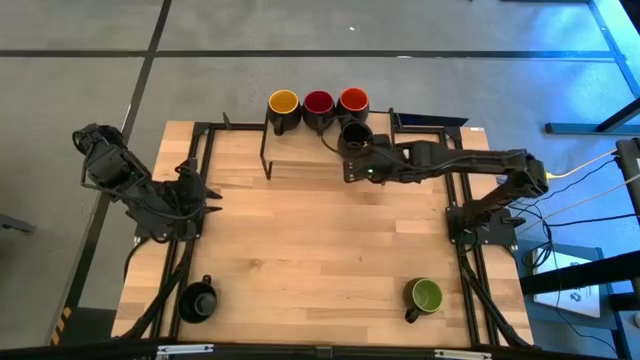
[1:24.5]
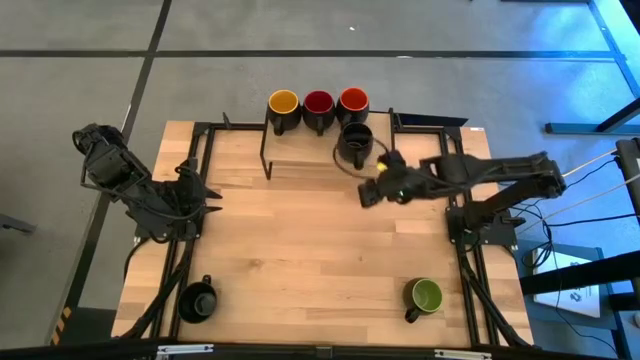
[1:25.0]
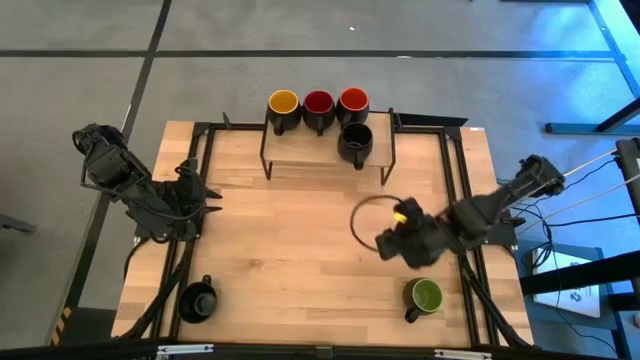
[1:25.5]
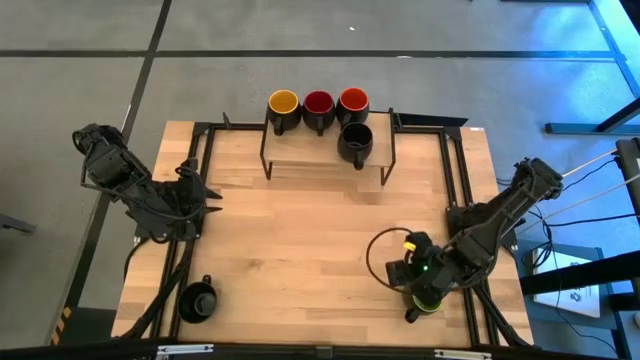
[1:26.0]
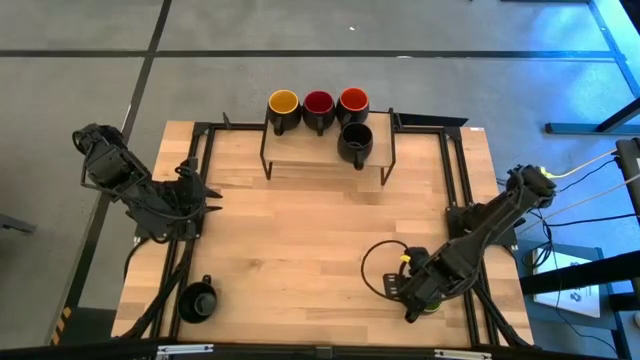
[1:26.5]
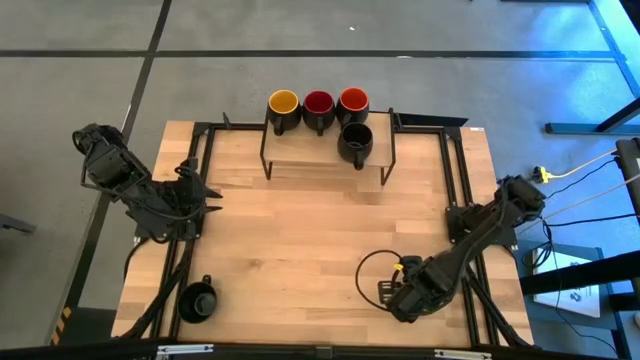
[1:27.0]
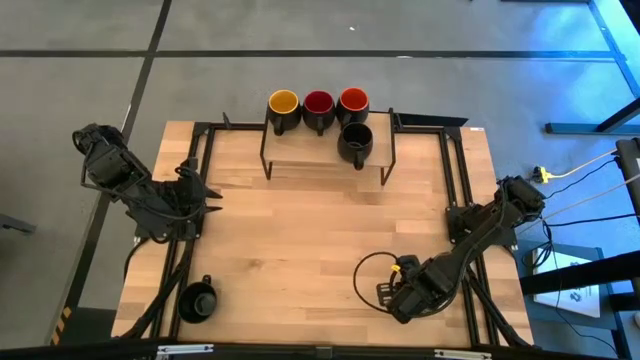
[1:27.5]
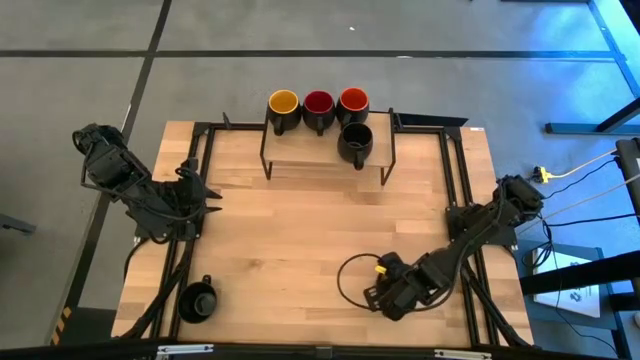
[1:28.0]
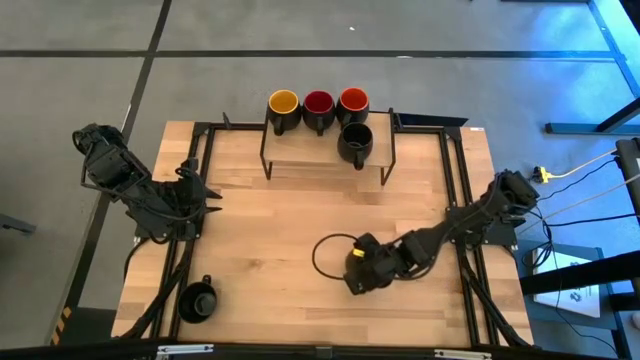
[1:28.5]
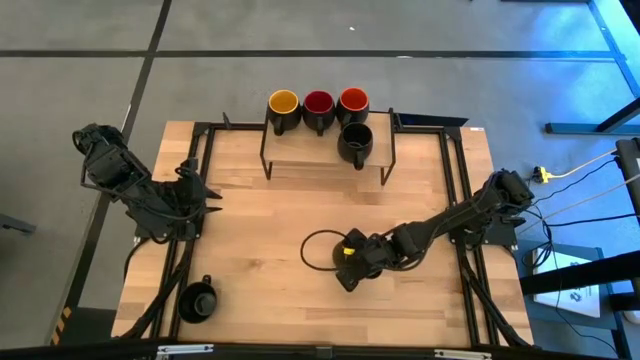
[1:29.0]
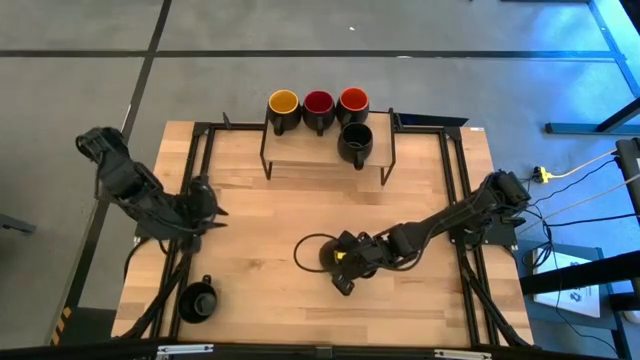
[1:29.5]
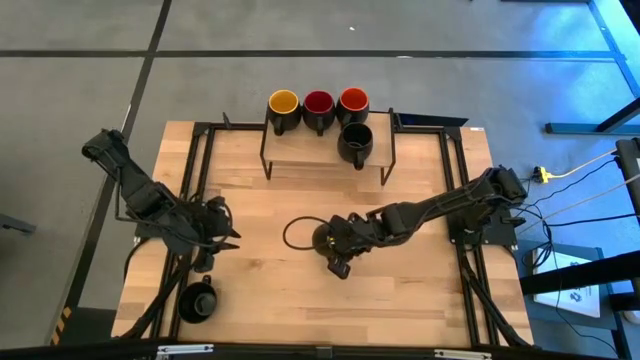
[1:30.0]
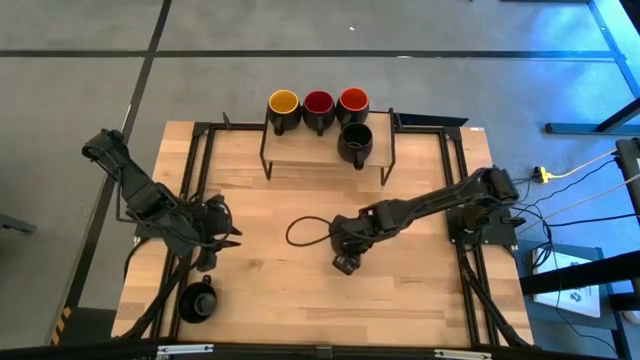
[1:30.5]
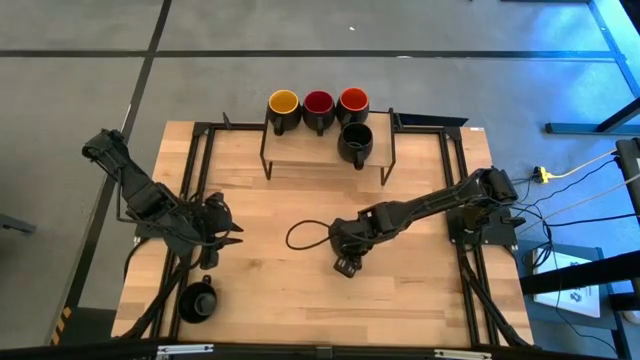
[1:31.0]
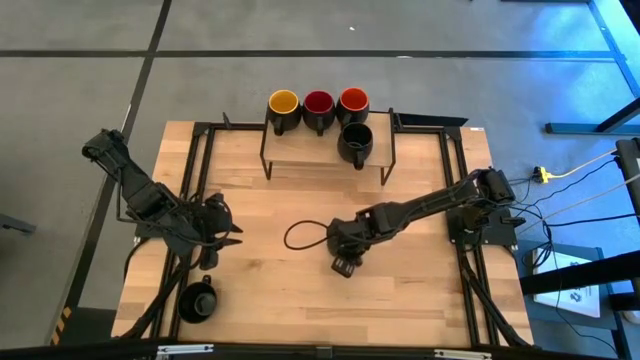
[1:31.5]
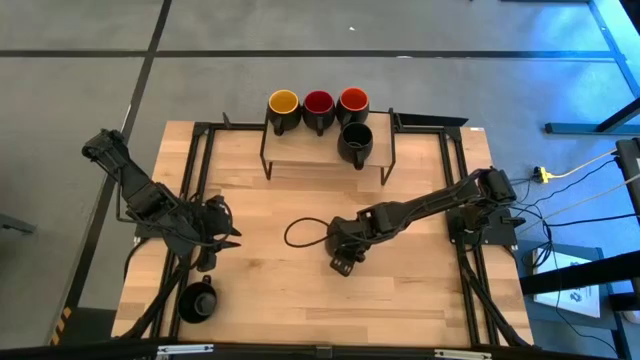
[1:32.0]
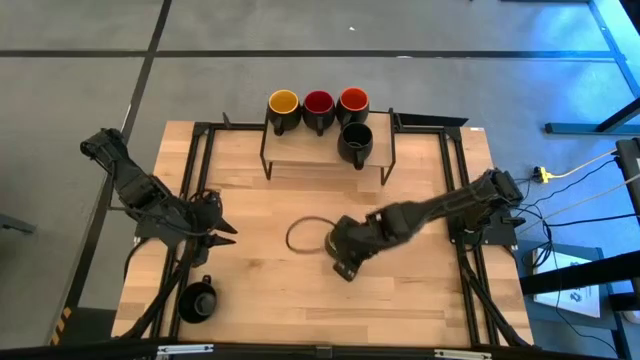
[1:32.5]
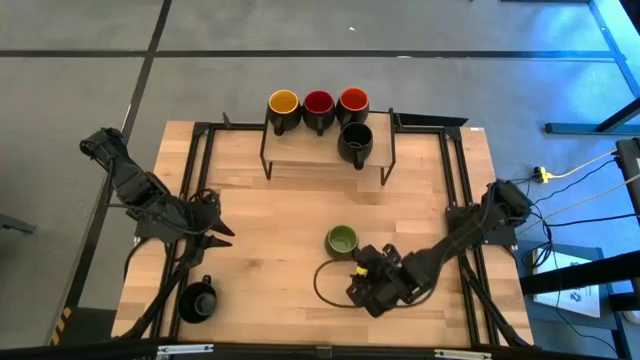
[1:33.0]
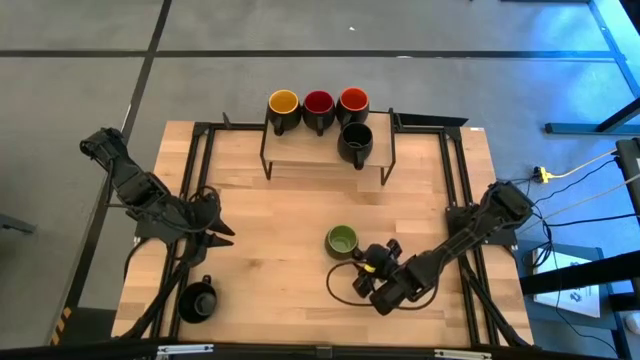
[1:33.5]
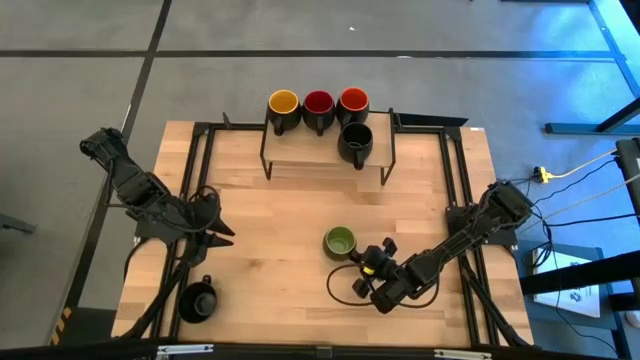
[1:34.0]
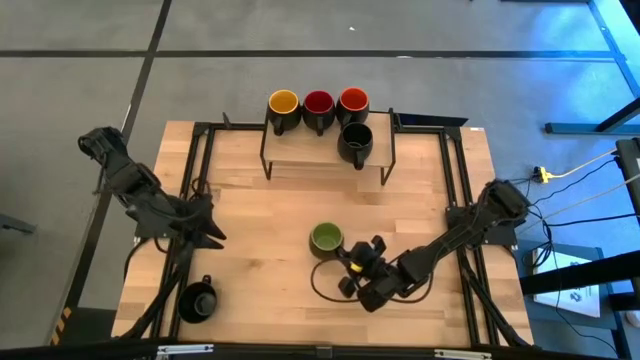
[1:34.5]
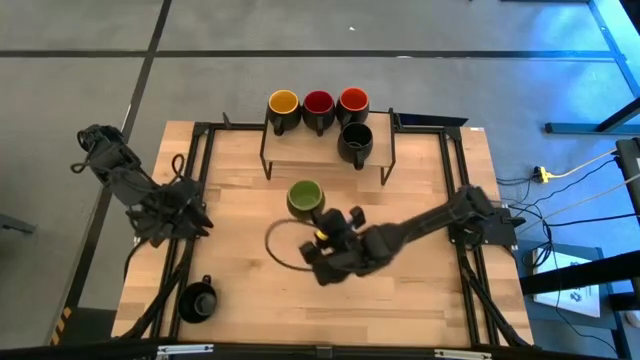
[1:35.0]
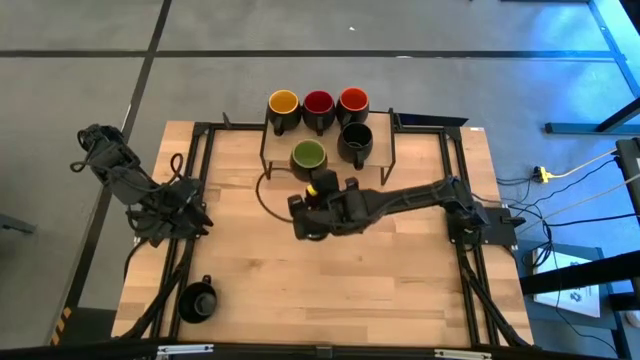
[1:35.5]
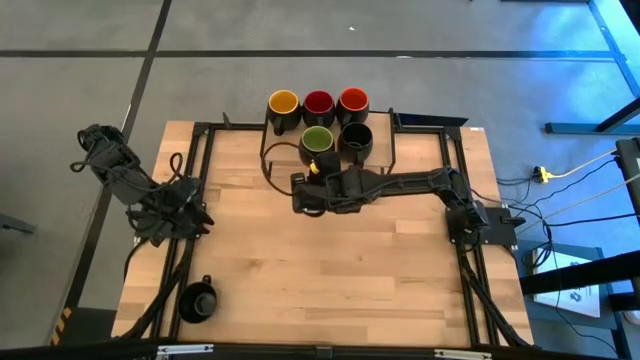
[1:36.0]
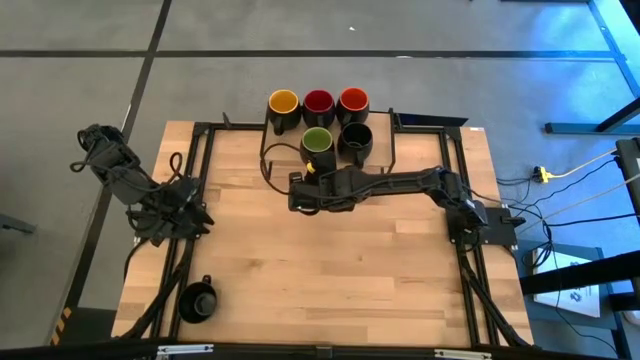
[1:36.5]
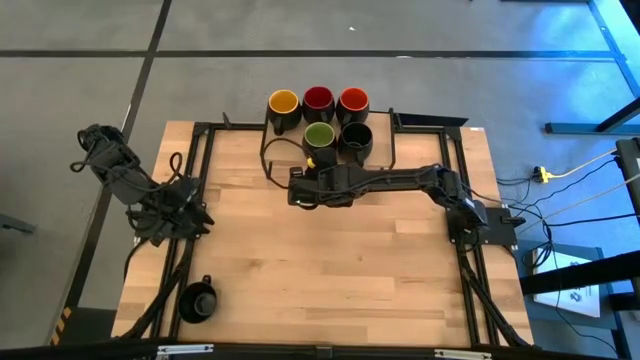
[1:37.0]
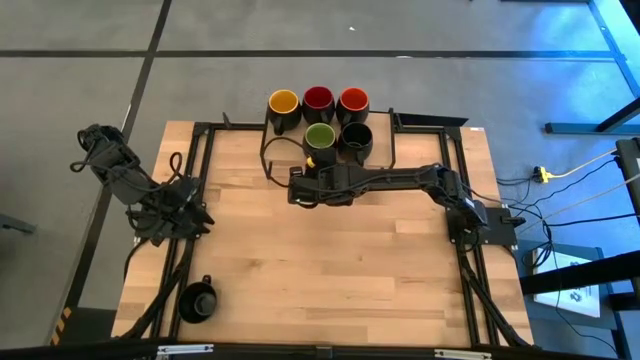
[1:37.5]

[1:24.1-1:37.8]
Task: Place coffee mugs
Put the green mug on the shelf

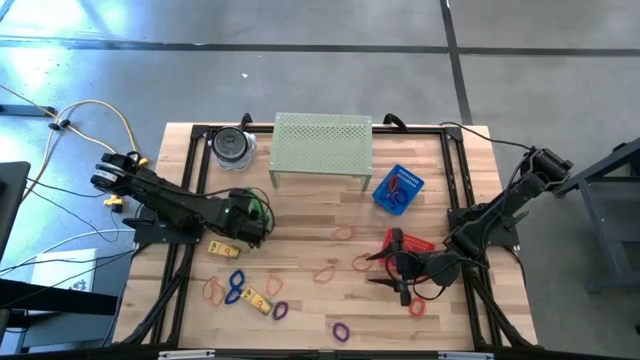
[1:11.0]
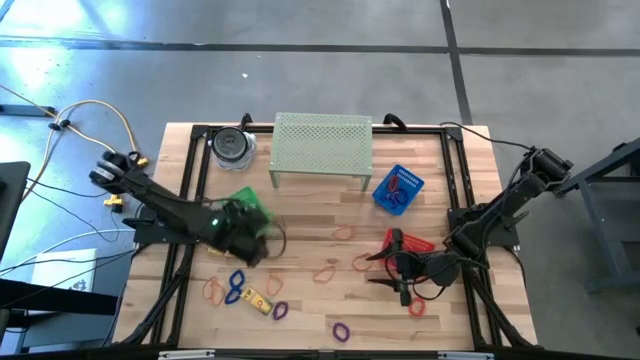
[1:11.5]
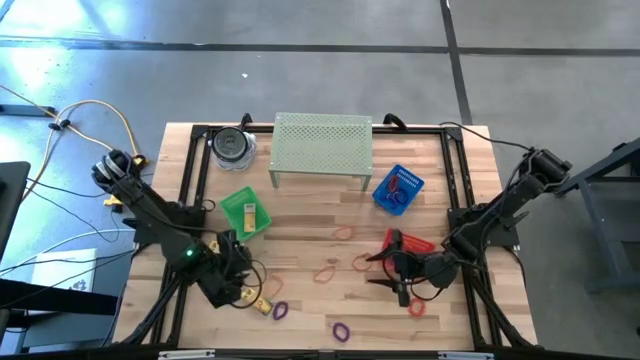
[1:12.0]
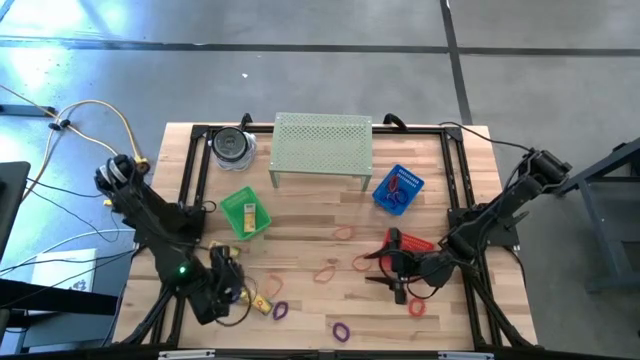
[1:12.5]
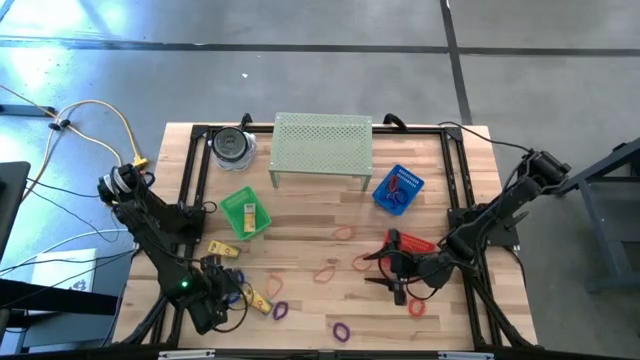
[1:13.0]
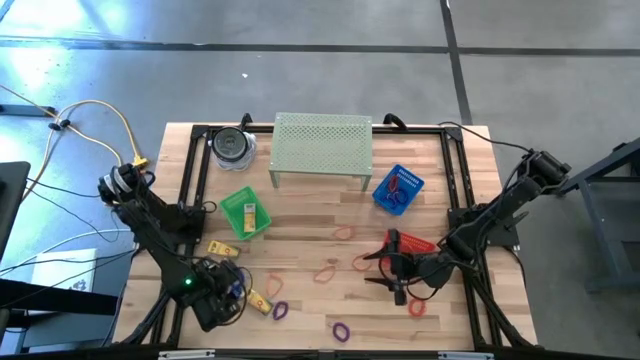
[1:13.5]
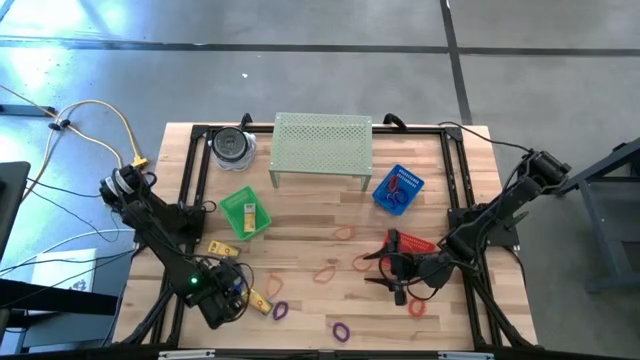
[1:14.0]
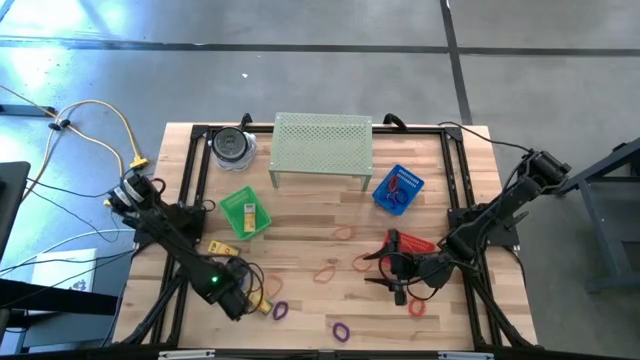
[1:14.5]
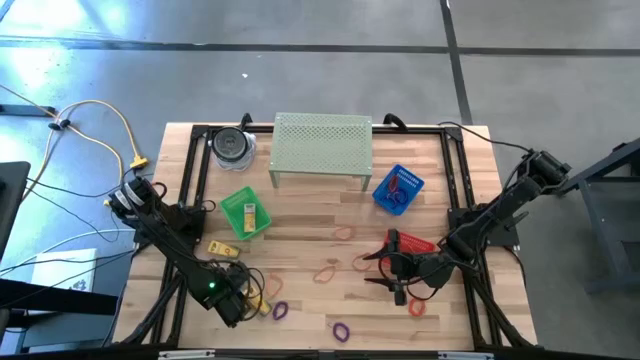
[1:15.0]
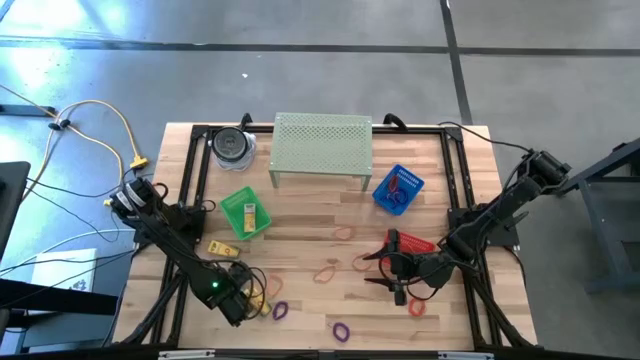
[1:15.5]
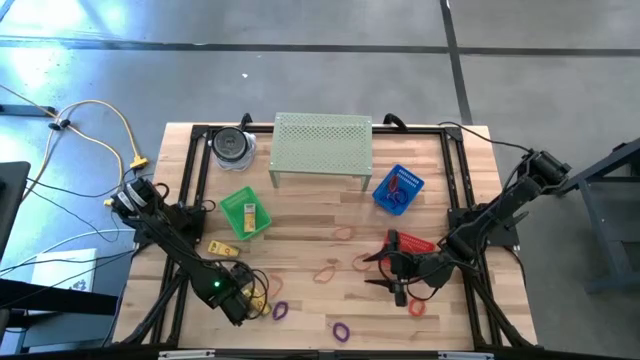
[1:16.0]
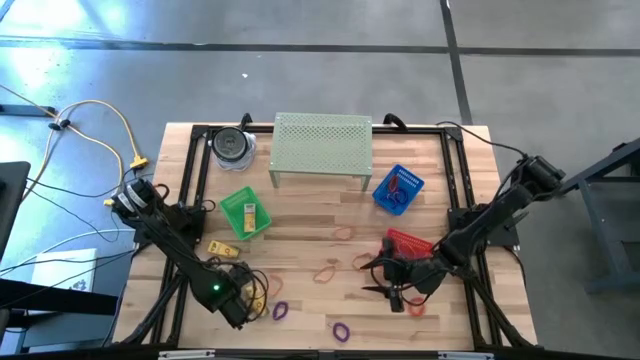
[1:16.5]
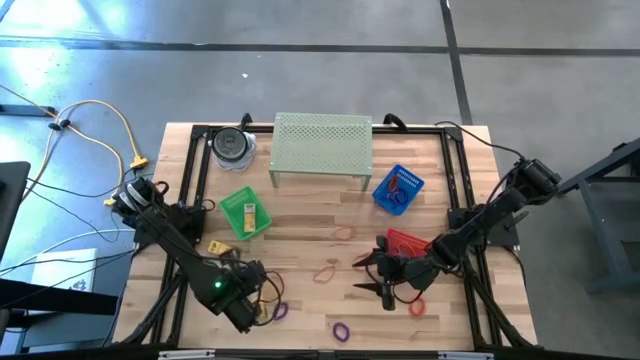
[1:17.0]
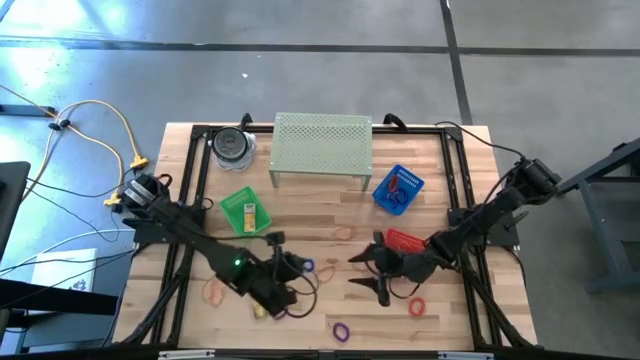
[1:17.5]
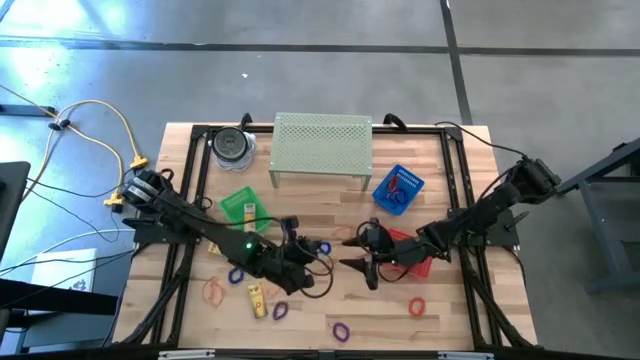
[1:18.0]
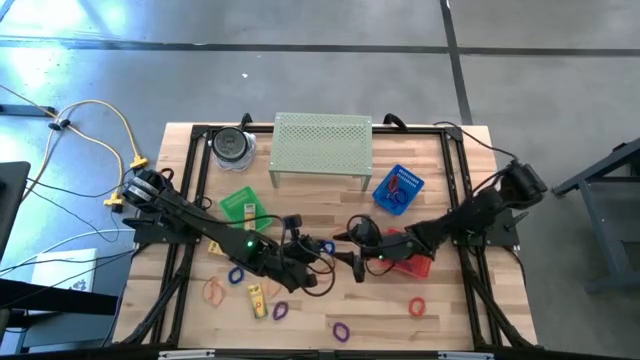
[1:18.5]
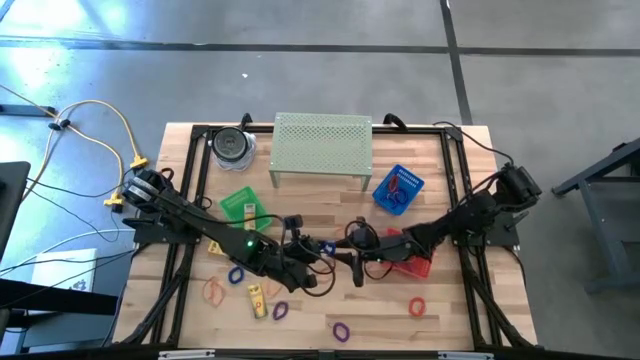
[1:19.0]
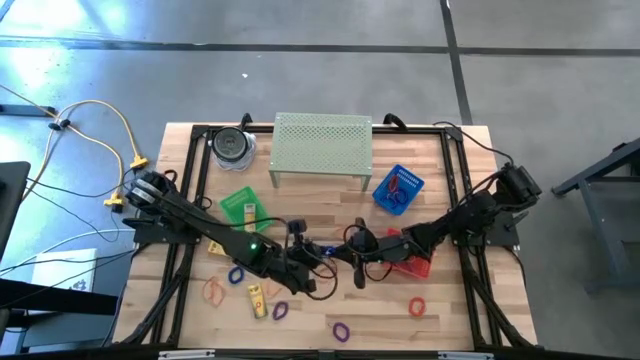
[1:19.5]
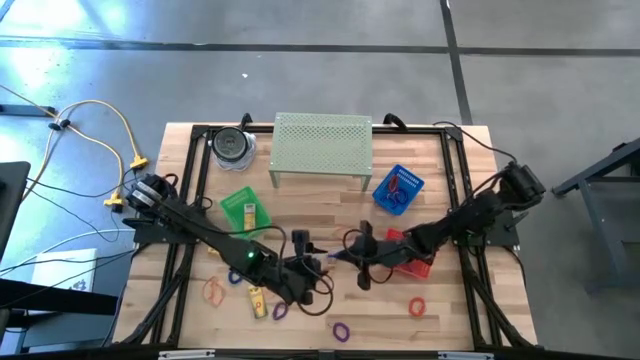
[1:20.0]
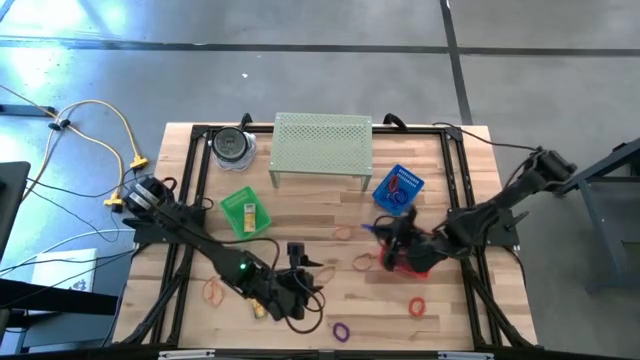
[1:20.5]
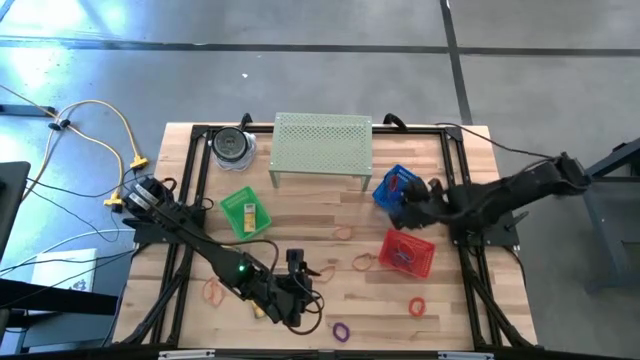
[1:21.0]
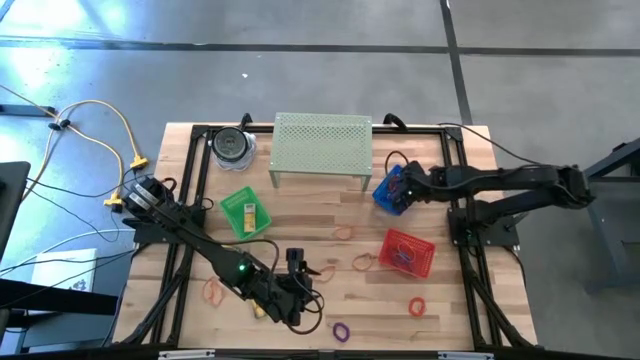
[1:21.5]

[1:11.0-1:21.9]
Task: Pick & Place Office Desk Supplies
Put the blue spring keychain into the blue basket
